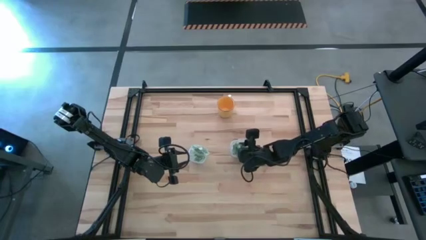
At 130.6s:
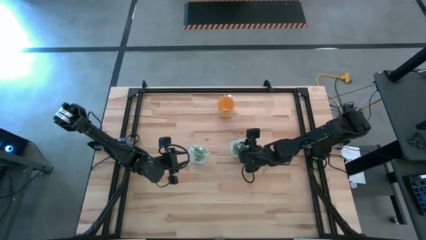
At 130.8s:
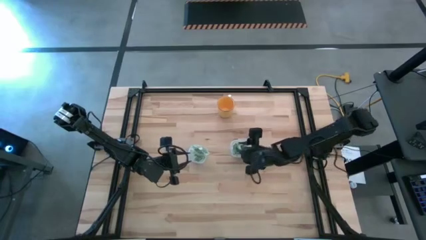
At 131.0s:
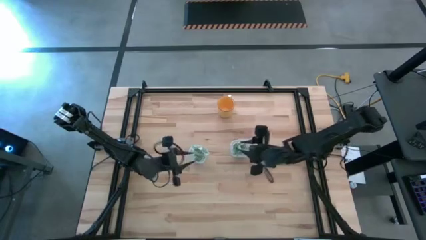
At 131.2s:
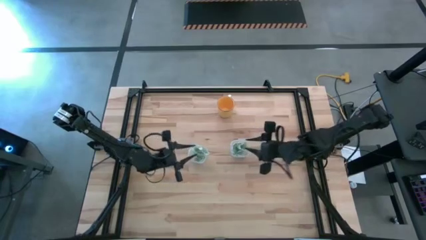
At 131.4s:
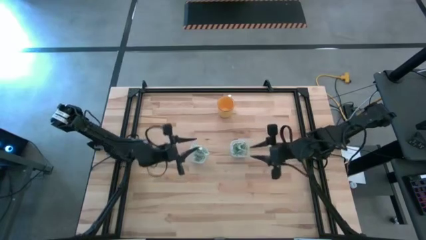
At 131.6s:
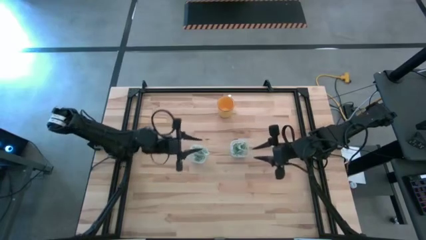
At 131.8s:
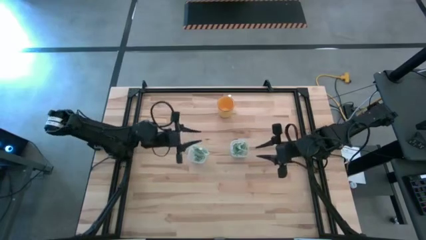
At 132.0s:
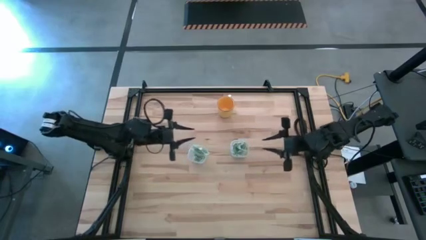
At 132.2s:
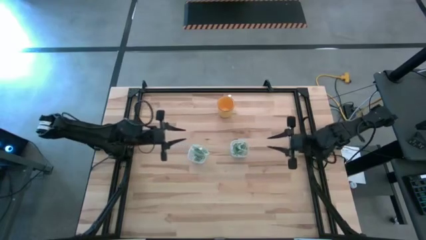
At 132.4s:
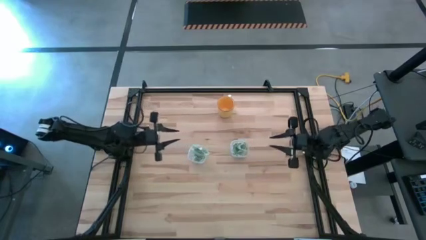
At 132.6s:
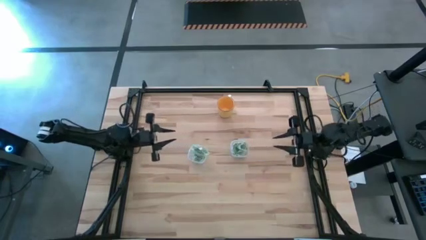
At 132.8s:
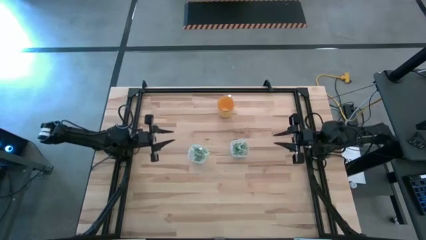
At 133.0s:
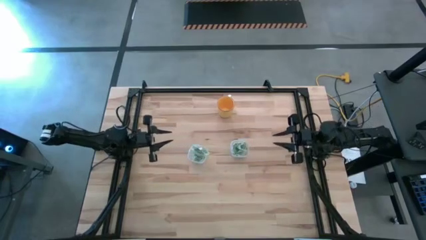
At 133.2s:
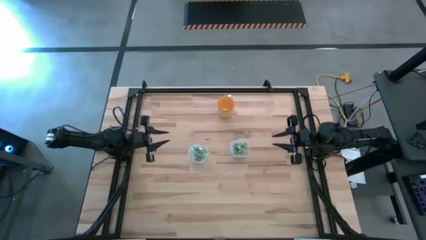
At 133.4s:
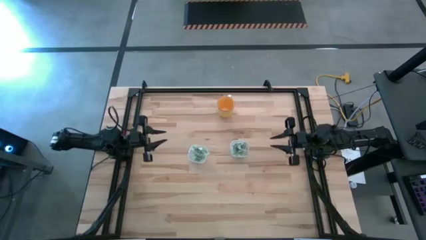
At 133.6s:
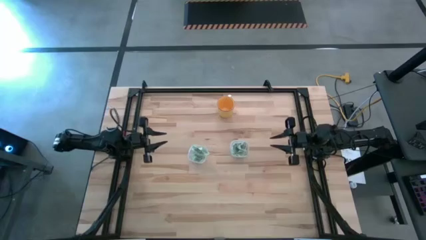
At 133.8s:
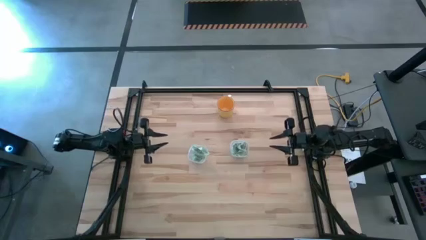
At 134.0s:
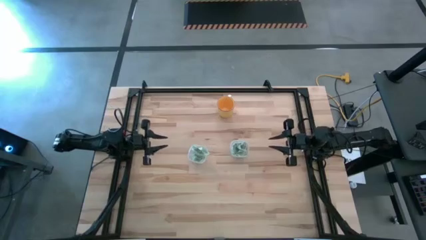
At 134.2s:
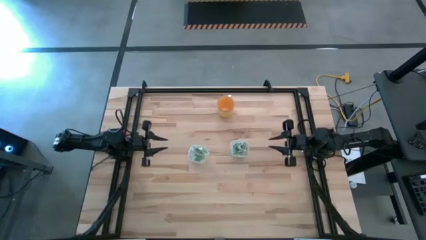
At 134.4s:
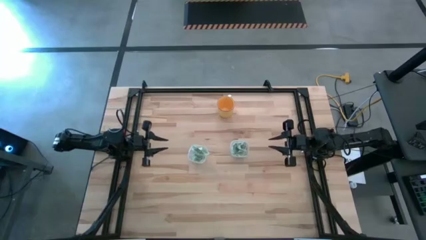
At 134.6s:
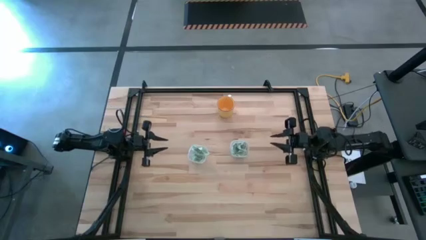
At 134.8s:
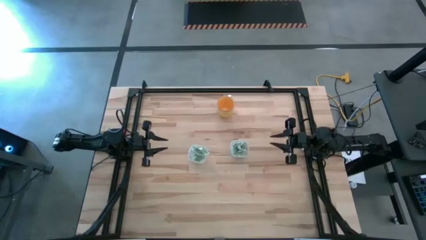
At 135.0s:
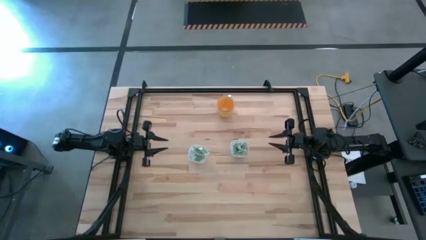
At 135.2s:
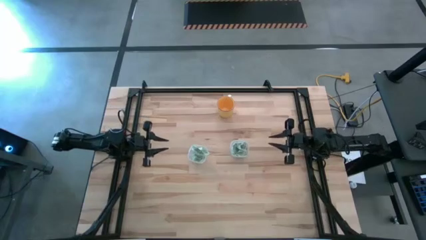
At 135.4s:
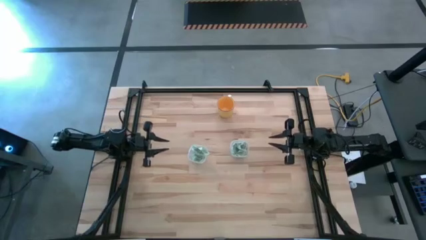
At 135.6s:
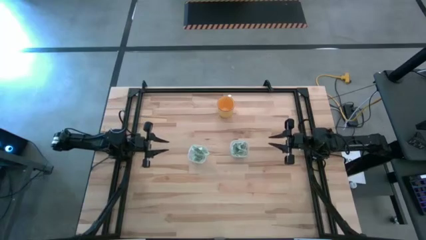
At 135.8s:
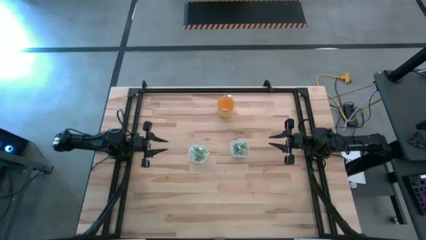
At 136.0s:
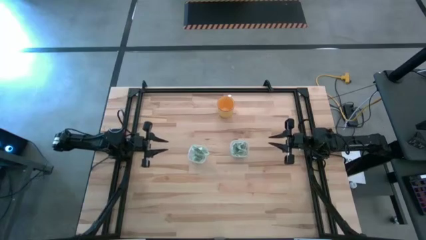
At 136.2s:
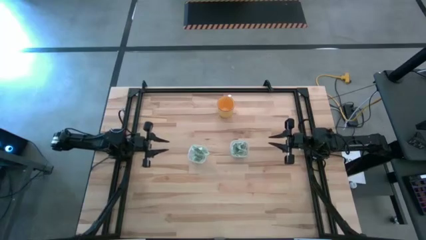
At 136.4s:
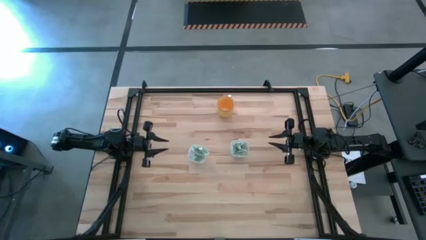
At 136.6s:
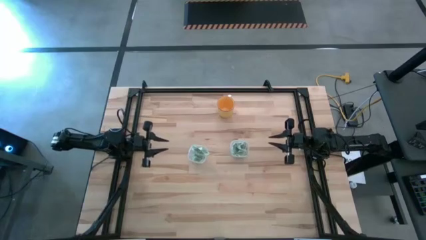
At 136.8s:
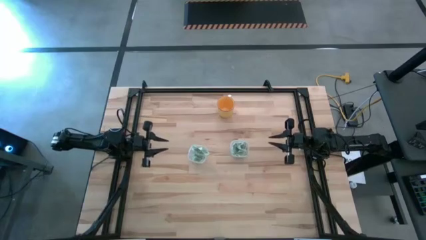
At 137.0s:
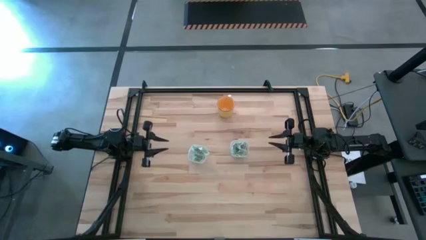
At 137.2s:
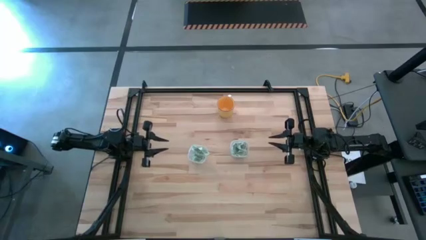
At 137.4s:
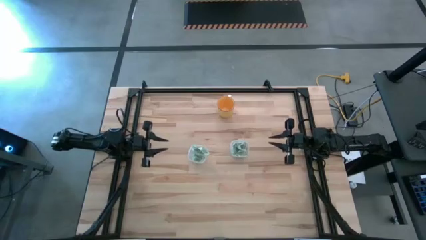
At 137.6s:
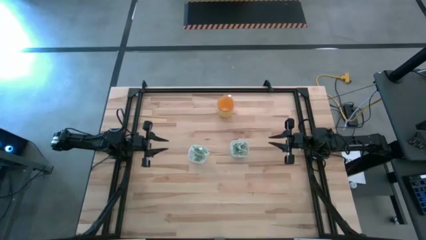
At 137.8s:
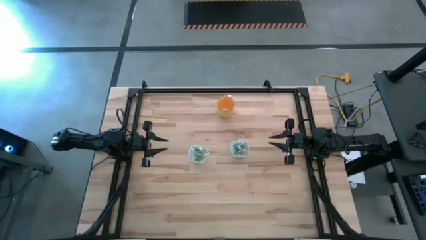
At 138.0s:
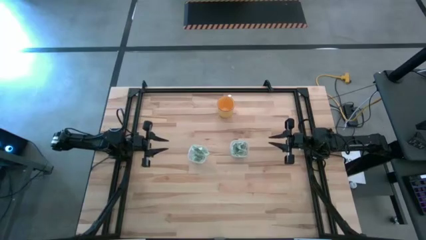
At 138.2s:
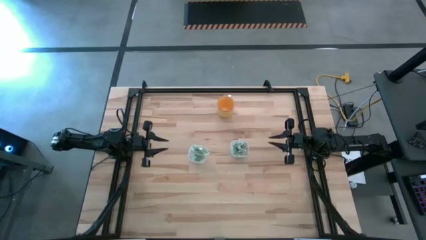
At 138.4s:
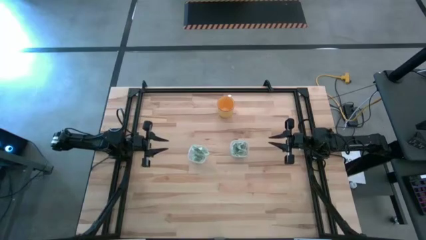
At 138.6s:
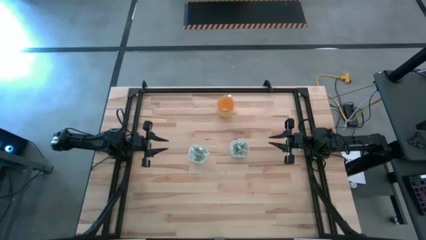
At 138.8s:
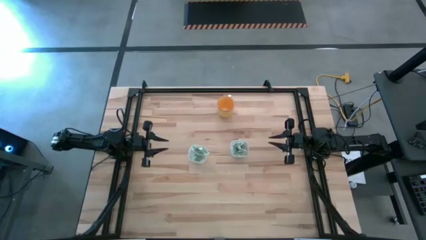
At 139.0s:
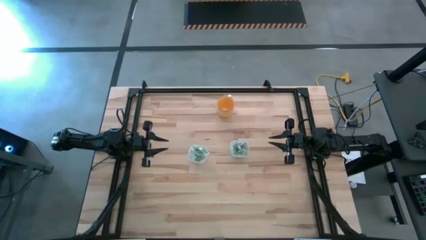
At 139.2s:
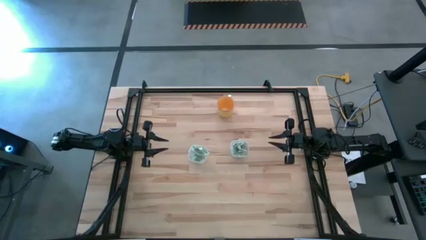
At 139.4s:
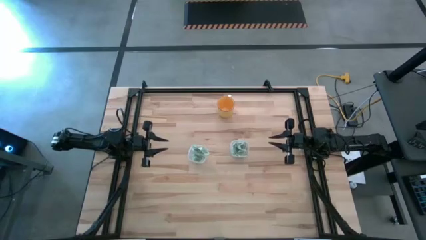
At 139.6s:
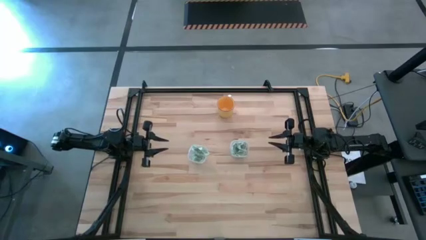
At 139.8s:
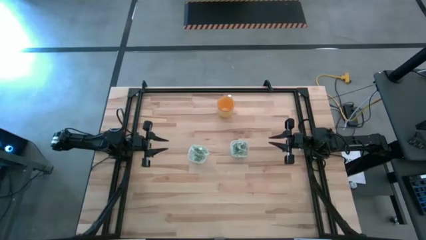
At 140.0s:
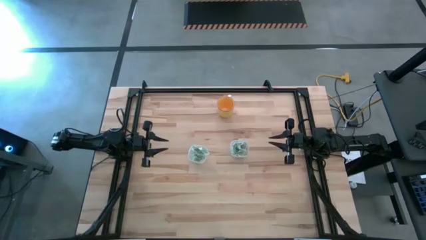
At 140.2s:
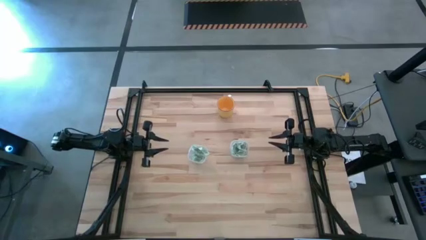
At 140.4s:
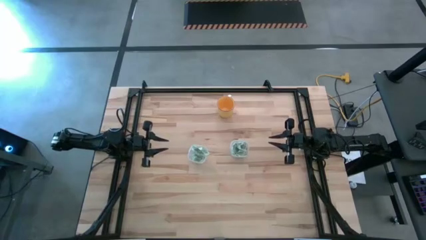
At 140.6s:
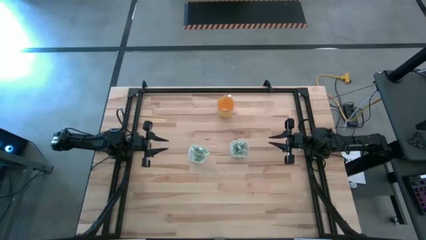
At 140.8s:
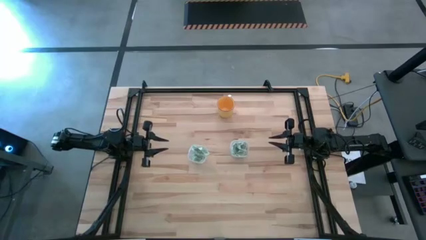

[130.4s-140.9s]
Task: Pick and place items into bin
Return to Home Position

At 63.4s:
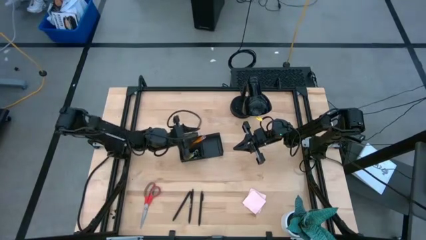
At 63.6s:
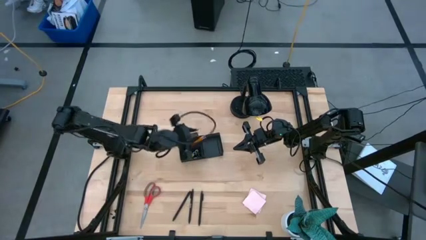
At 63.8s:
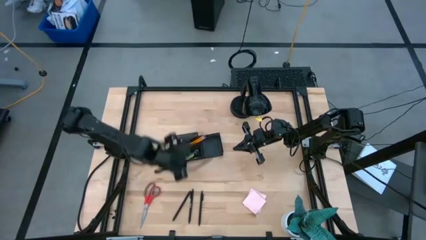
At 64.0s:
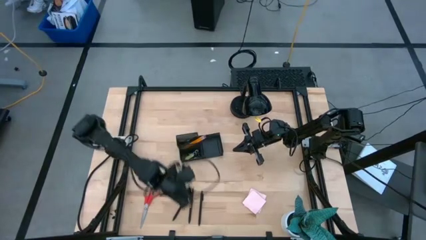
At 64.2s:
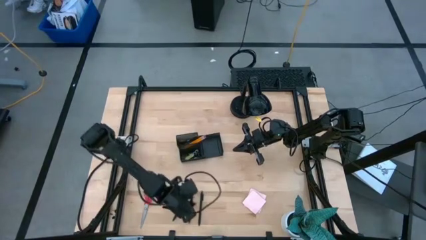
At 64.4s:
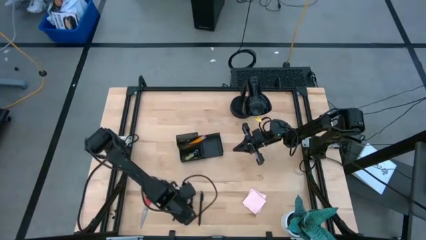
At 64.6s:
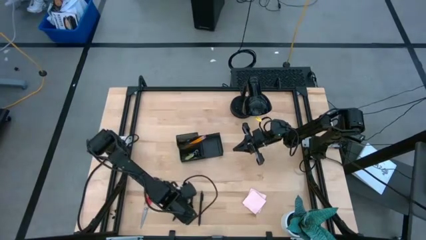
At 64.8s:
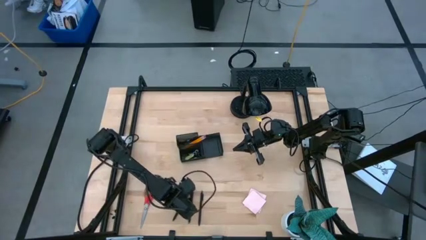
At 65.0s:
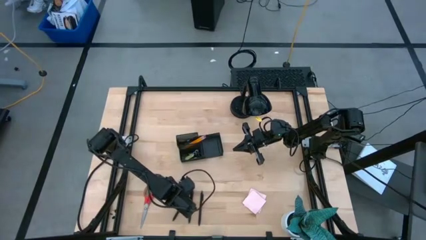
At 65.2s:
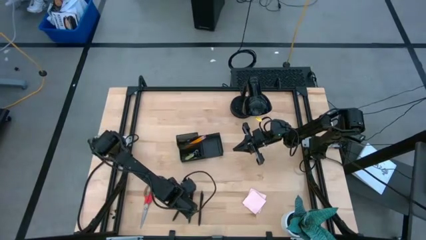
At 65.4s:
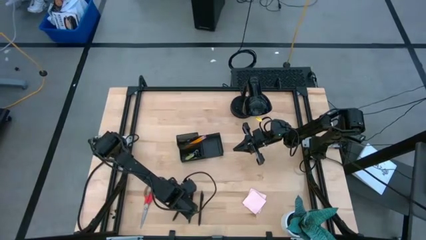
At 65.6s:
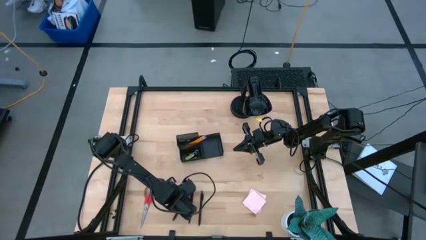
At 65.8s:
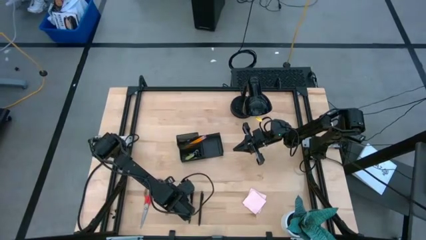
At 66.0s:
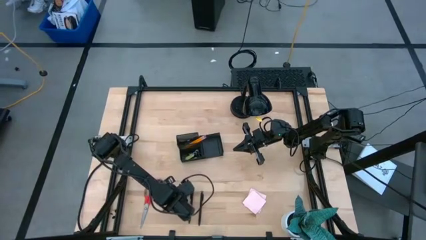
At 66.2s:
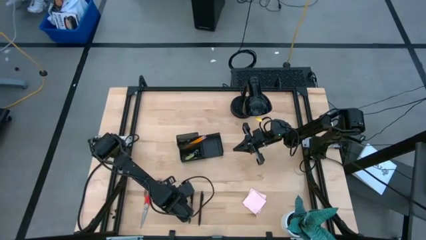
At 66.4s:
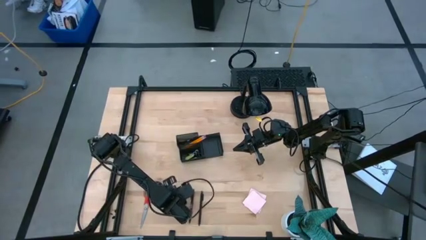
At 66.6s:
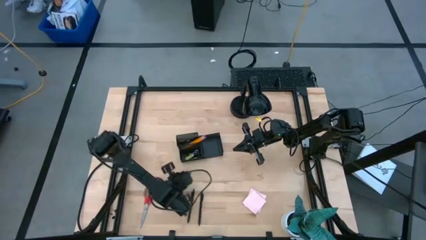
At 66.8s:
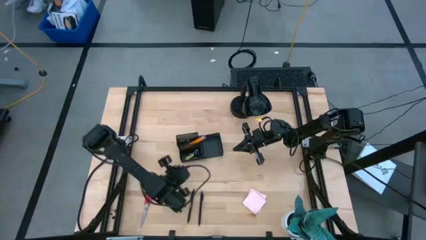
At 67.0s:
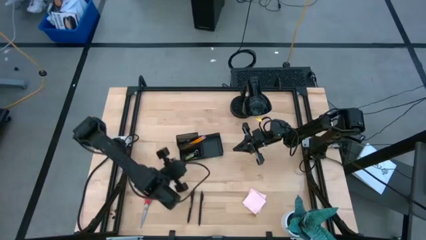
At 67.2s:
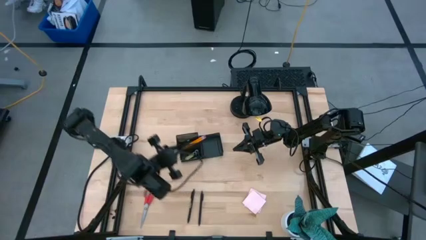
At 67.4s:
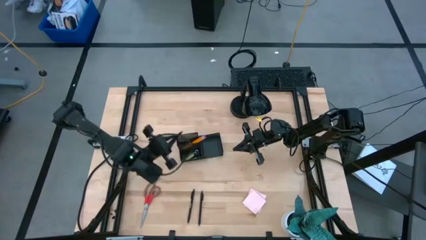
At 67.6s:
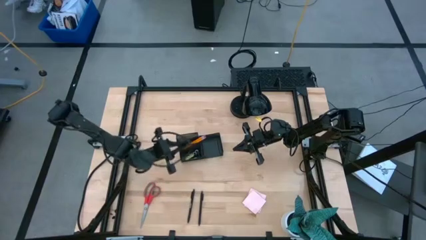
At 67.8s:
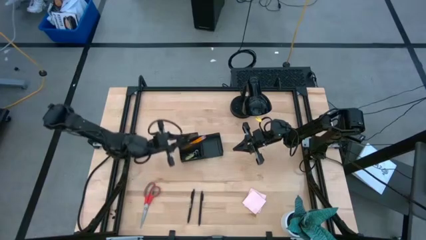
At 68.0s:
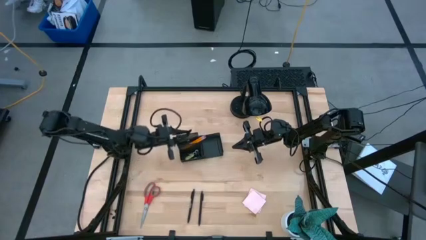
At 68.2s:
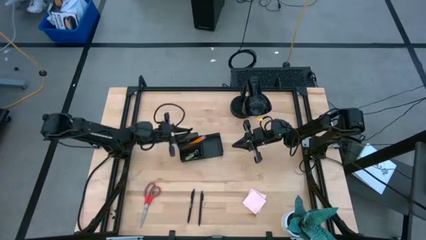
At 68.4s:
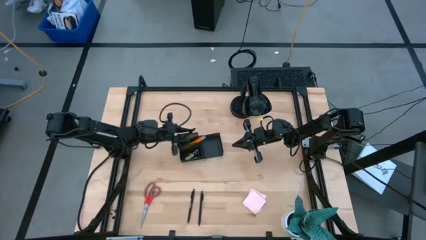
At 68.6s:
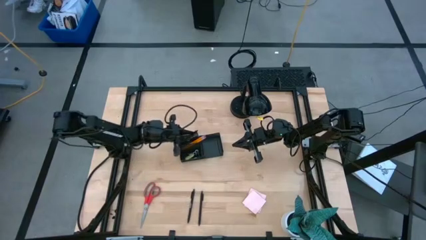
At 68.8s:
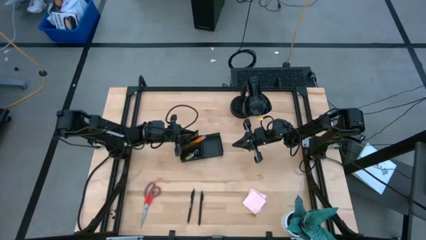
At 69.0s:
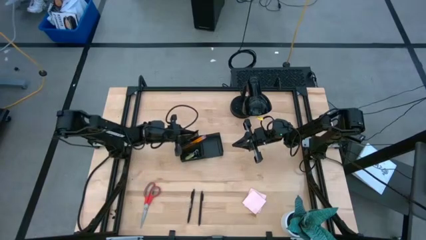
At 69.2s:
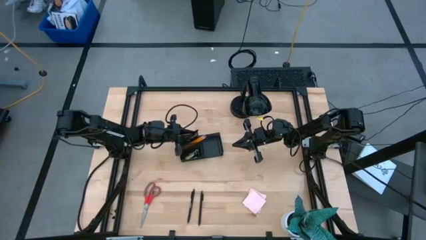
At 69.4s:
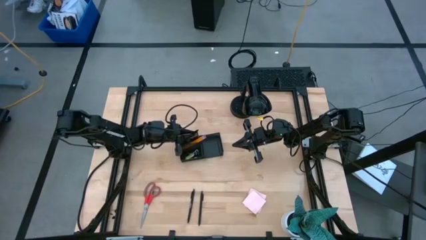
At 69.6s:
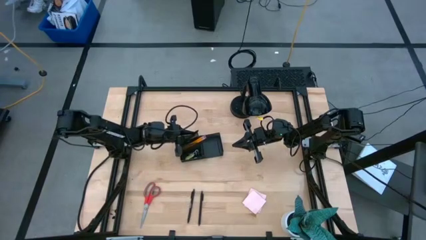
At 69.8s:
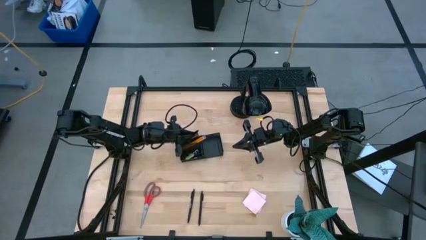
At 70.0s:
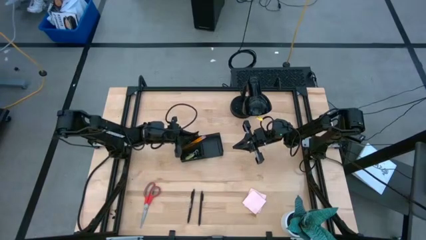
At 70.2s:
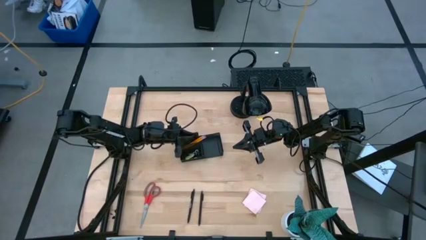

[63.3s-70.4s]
Task: Pick and place office supplies into organizer
Put the black pen into the black desk organizer
